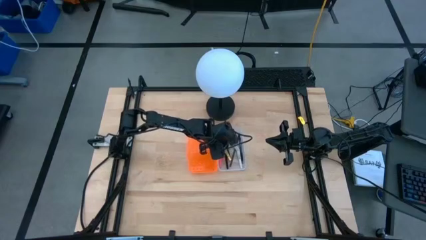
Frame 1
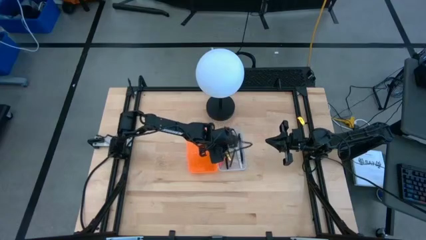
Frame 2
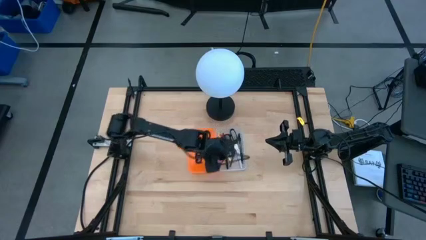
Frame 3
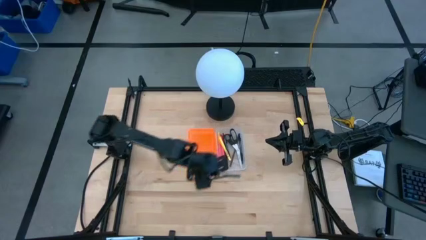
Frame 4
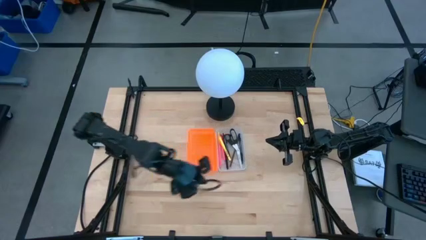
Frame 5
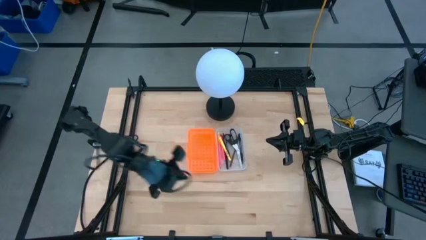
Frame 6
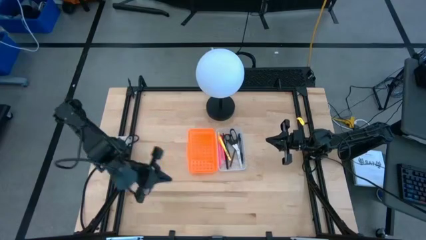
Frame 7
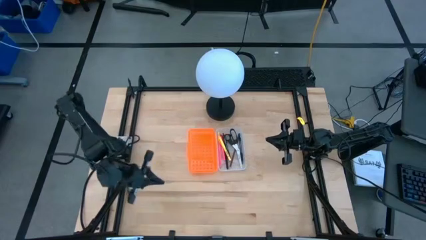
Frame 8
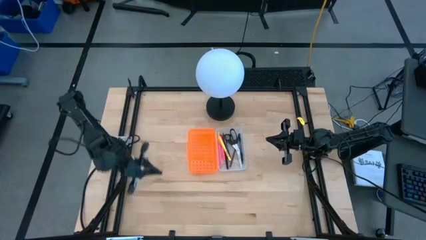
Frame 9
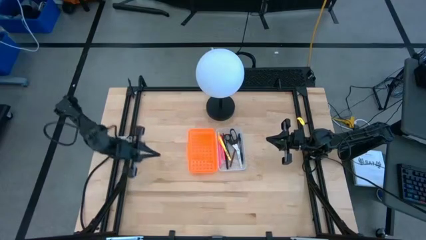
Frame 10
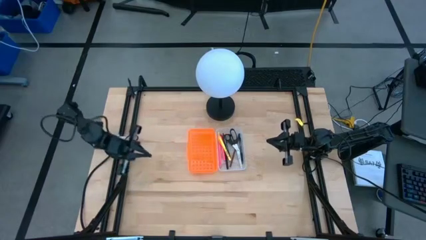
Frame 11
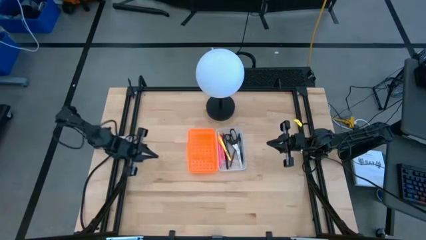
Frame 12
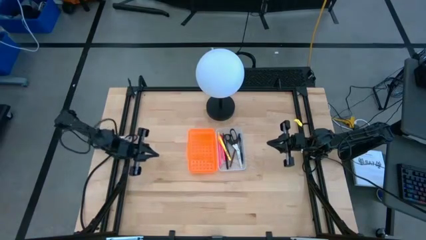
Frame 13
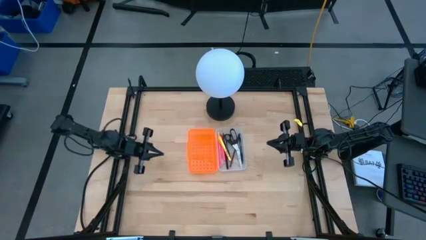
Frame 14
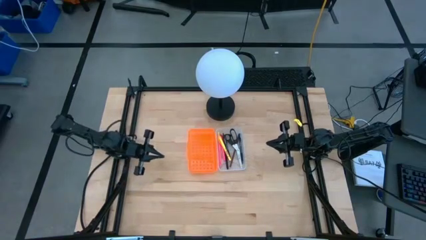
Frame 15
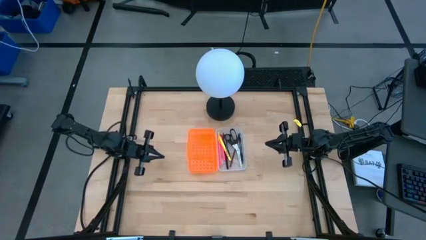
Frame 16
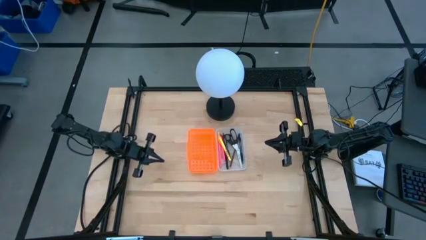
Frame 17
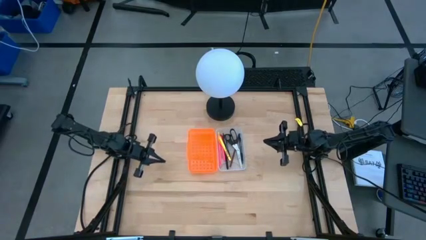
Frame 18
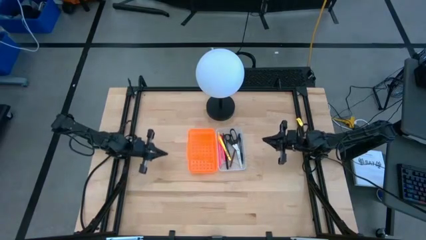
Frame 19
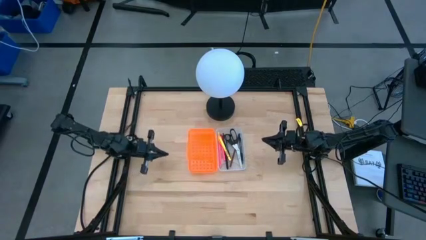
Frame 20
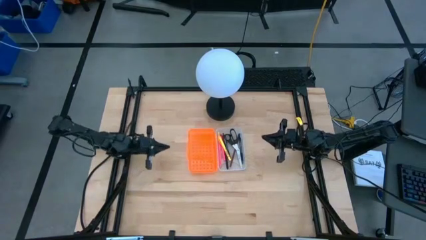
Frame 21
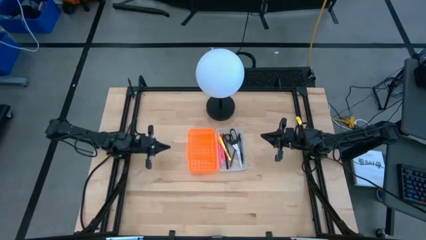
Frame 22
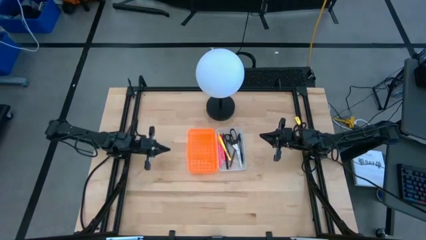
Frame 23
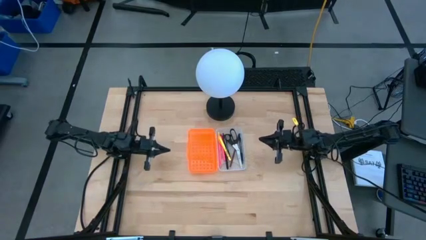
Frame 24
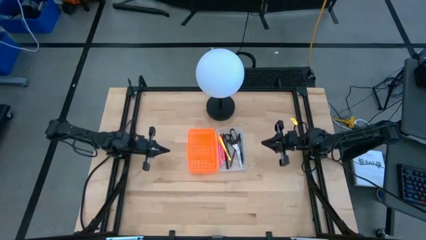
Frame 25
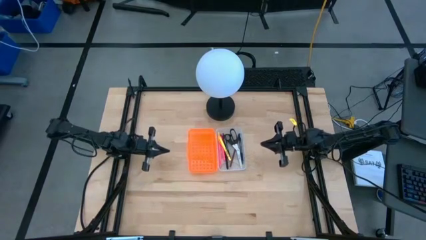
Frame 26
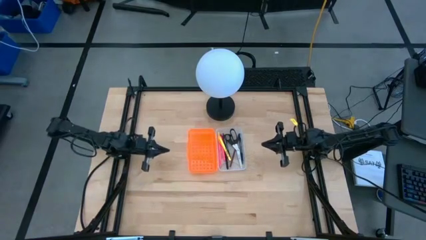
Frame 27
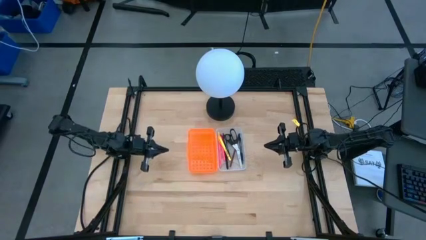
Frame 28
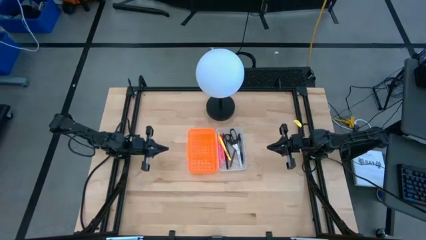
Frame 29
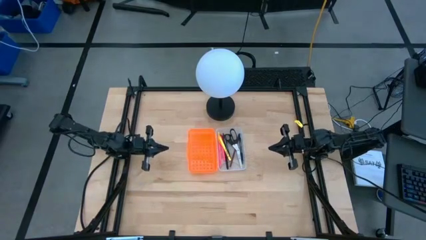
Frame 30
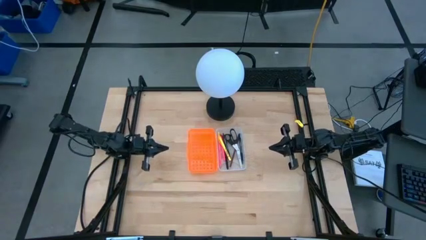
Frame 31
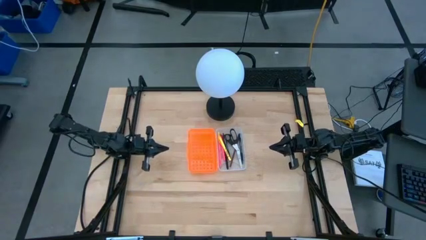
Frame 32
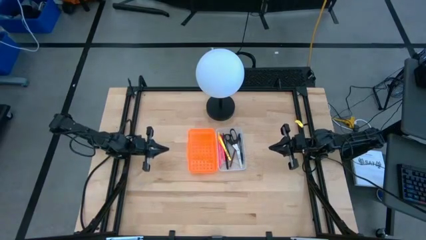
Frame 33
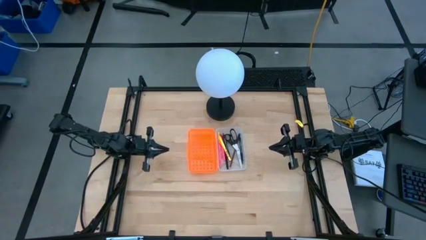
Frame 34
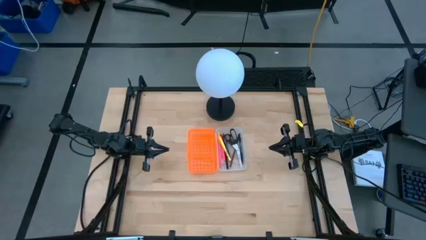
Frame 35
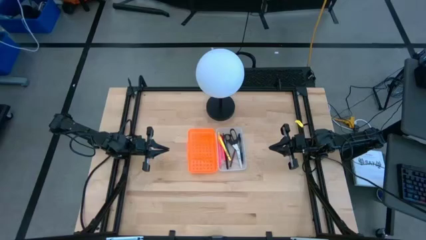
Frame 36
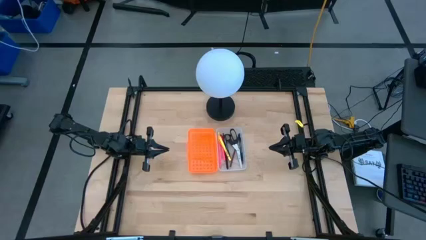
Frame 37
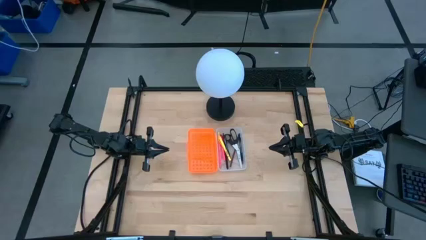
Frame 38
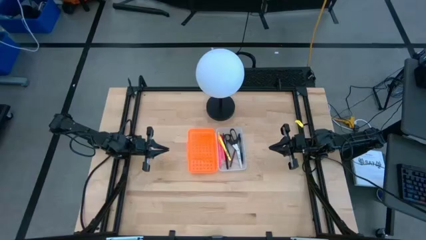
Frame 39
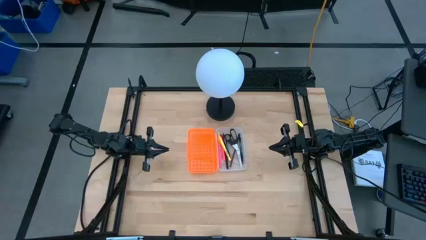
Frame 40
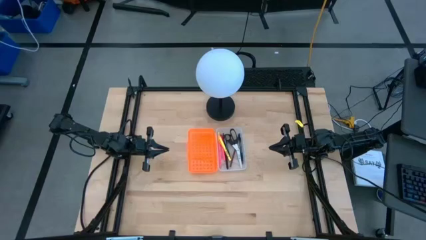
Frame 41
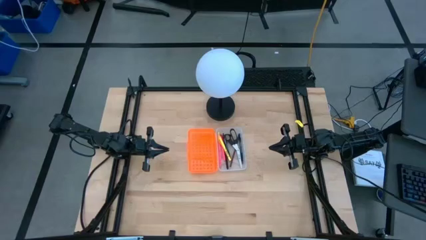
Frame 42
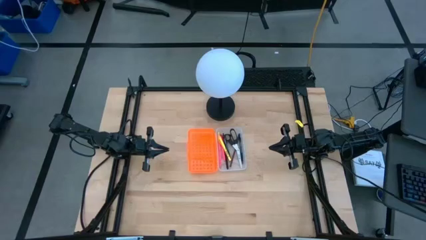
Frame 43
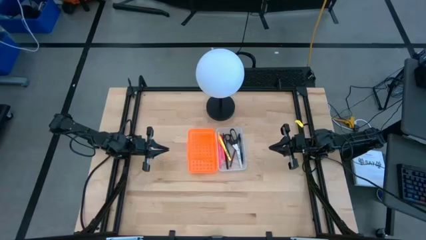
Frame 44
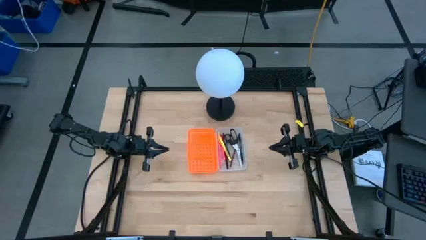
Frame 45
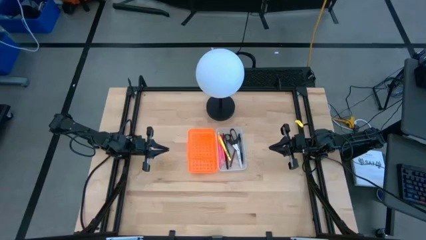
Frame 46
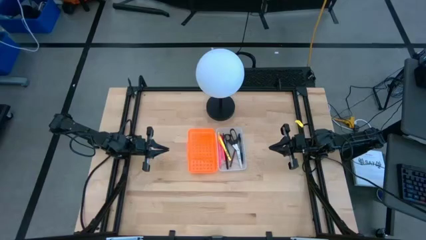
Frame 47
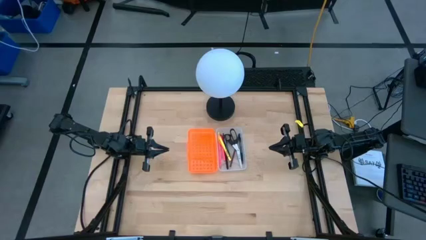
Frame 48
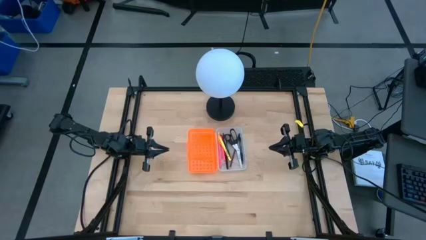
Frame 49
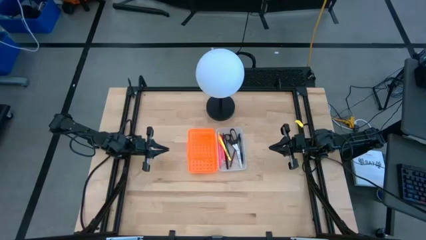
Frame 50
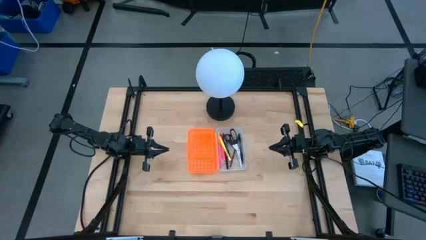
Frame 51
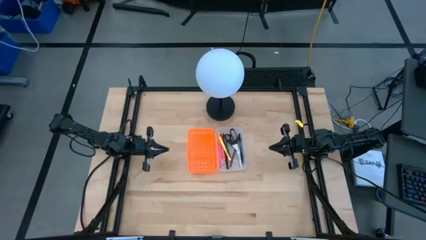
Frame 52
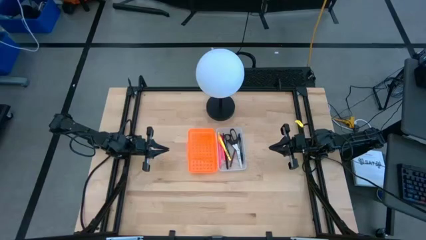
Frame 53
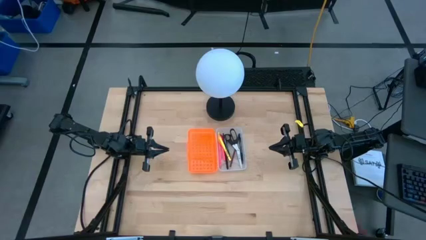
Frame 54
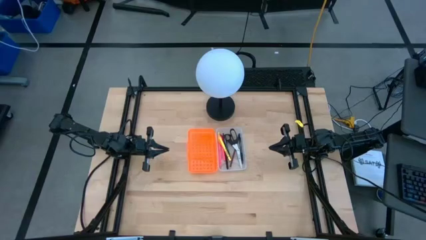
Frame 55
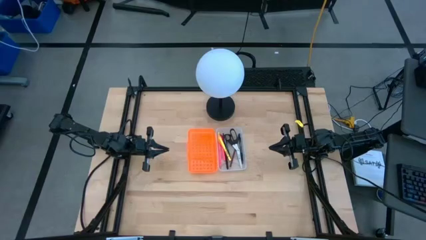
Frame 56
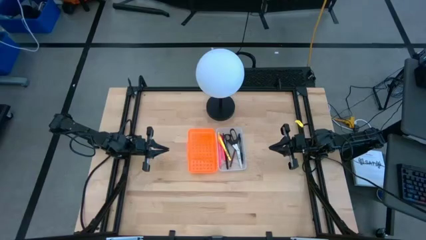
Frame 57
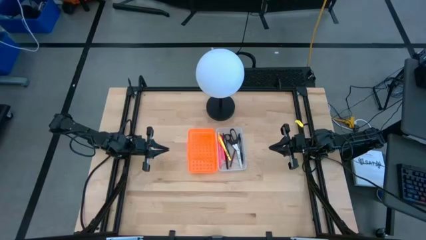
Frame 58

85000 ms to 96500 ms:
Task: Pick & place school supplies into a supply box
Return to Home Position

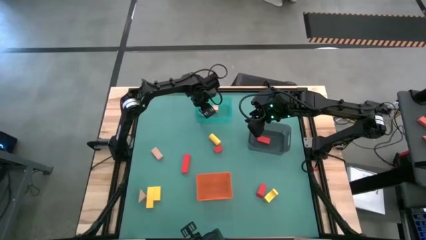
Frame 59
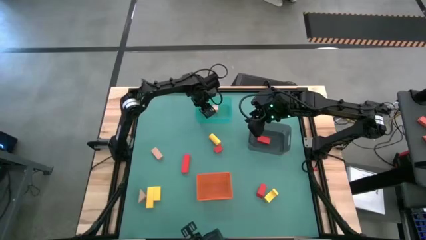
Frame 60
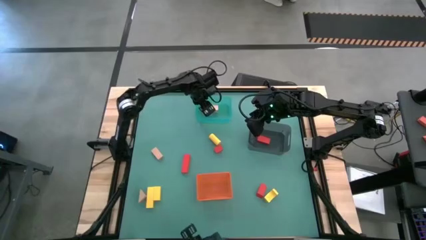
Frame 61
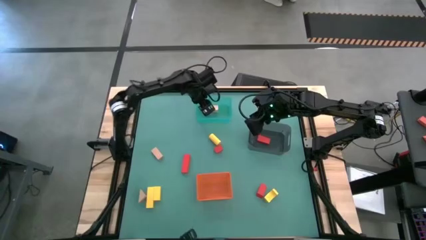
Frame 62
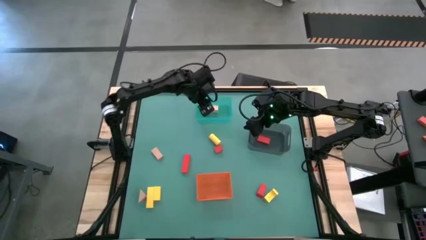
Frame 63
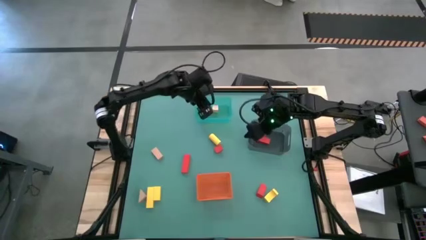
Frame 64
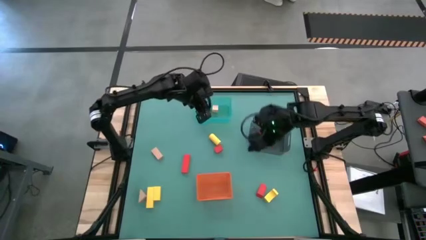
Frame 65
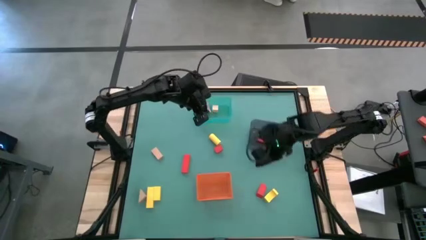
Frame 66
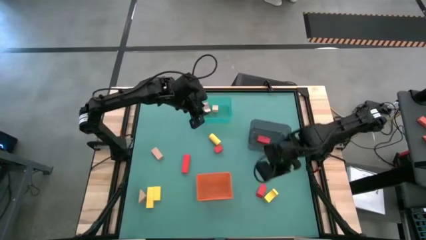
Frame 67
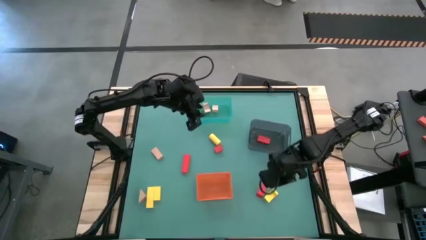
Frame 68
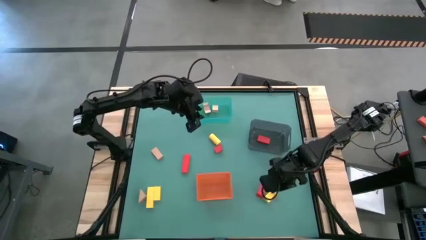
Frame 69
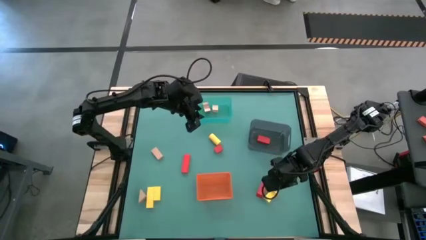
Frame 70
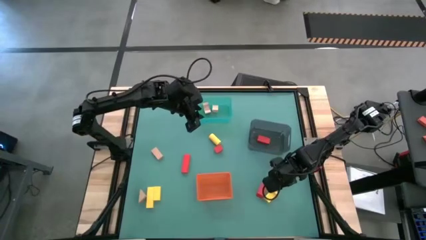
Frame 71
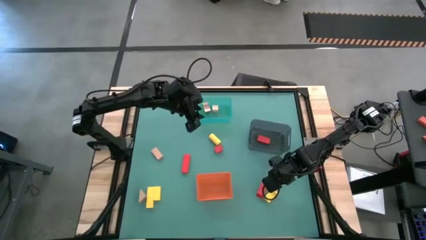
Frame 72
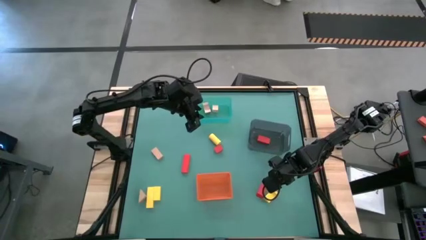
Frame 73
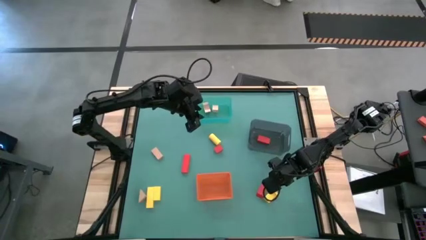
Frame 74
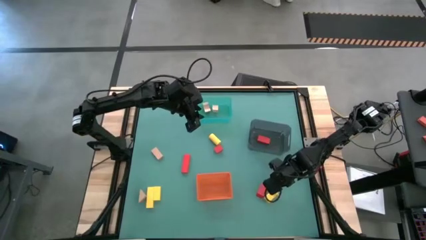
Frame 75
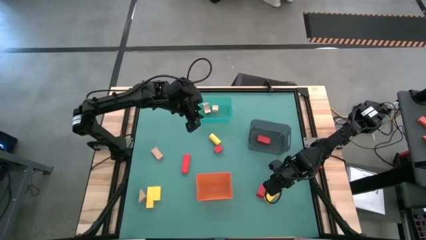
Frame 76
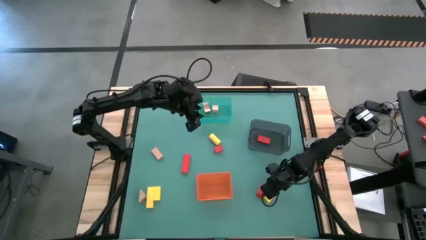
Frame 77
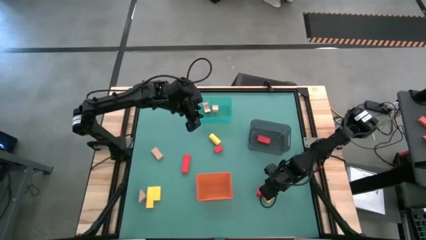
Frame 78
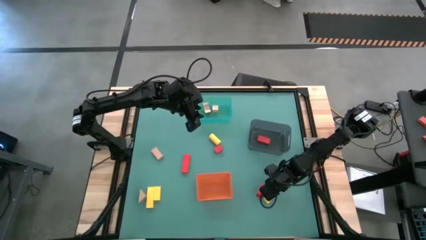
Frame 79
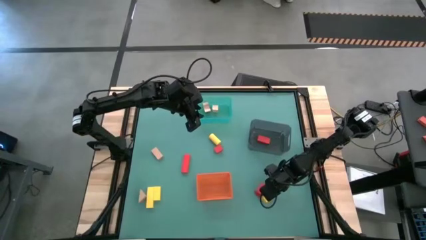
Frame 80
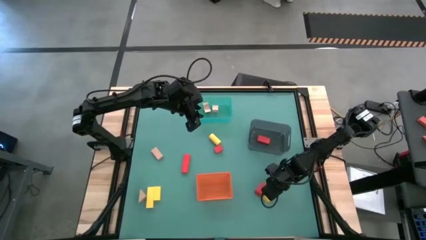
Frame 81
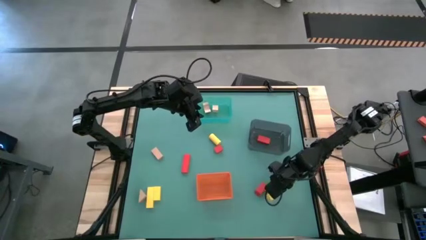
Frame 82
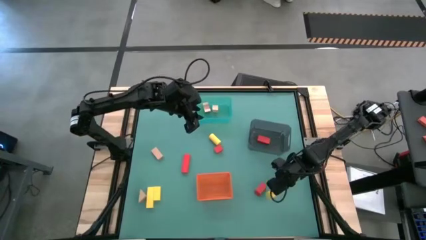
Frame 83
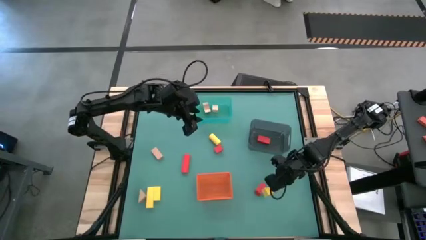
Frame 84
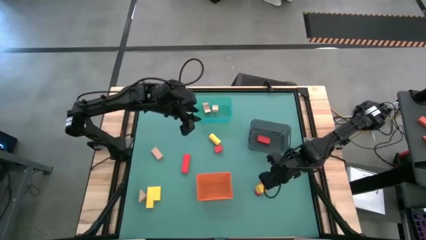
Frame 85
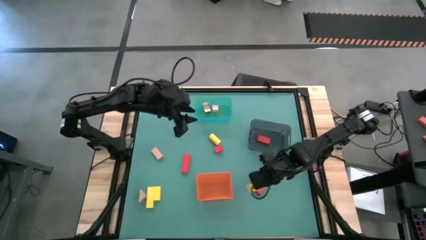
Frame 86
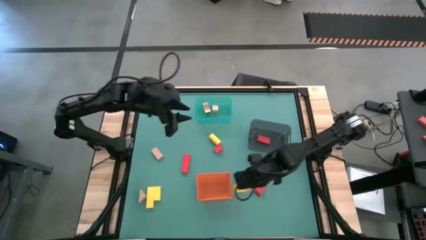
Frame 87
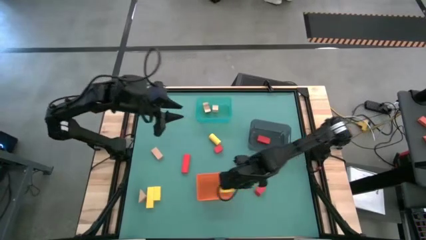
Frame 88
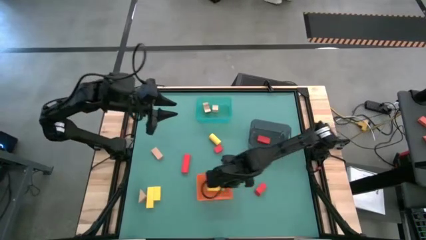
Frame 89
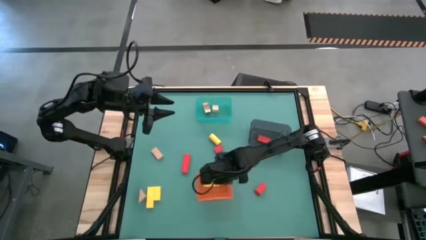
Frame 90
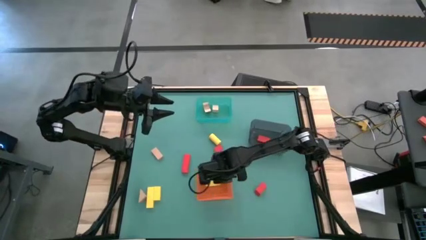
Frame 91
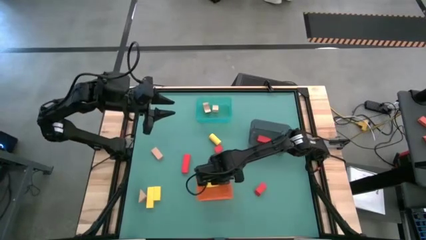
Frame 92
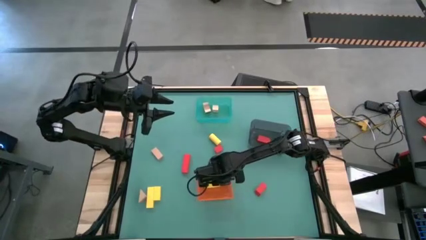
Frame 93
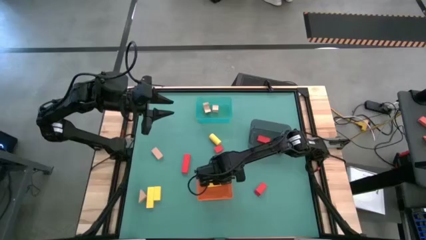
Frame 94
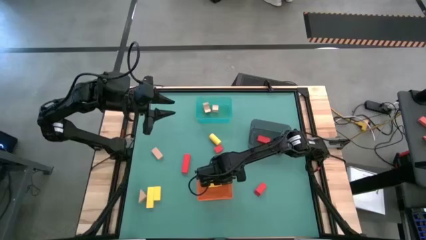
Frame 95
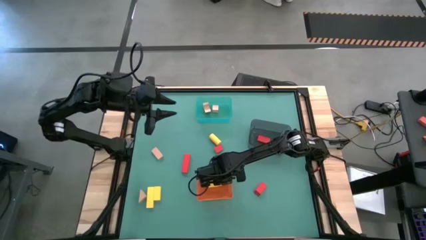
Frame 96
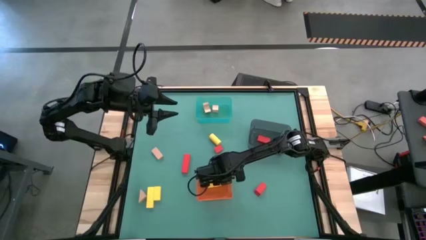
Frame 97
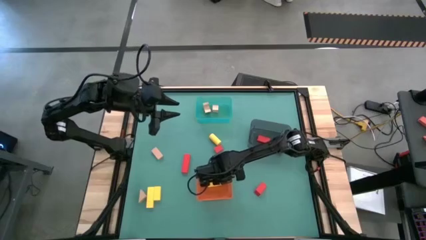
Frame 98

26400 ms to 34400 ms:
Task: Sort & place blocks by color
Put the yellow block into the orange bin
